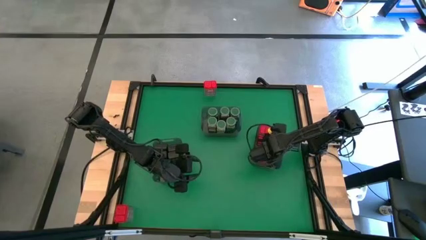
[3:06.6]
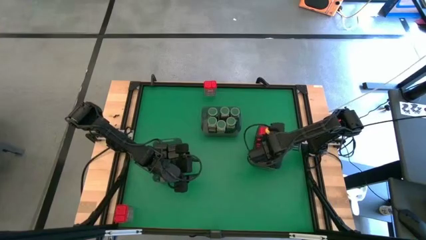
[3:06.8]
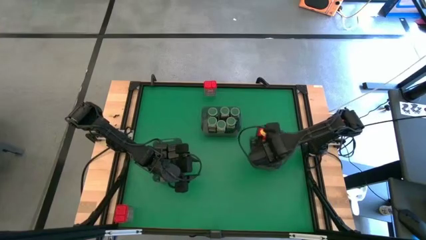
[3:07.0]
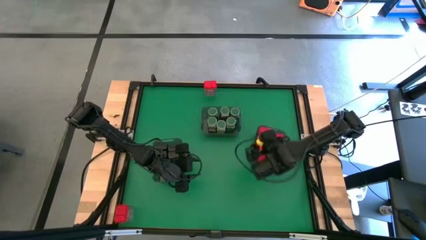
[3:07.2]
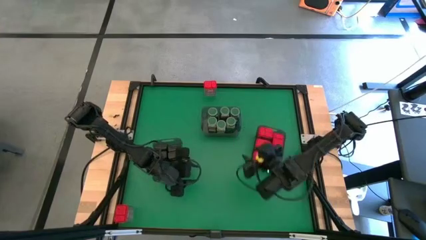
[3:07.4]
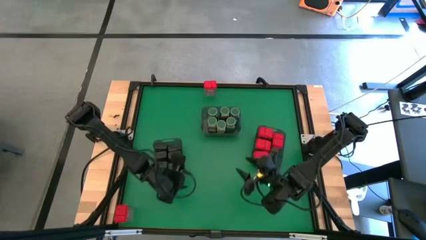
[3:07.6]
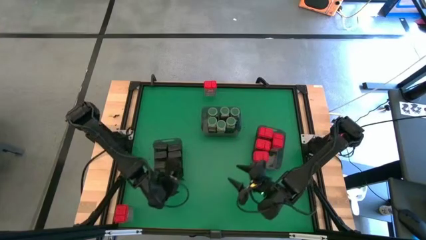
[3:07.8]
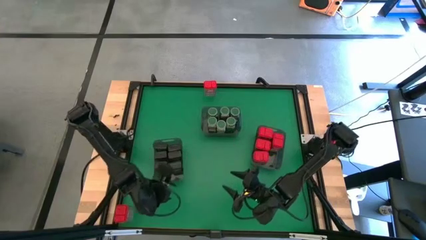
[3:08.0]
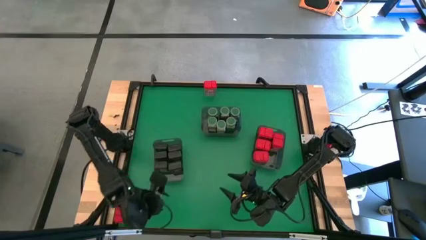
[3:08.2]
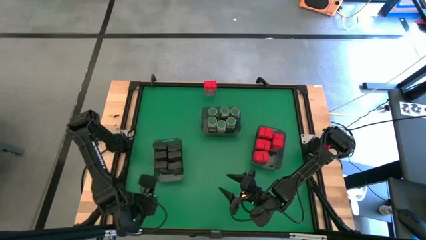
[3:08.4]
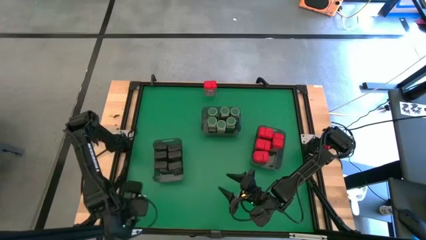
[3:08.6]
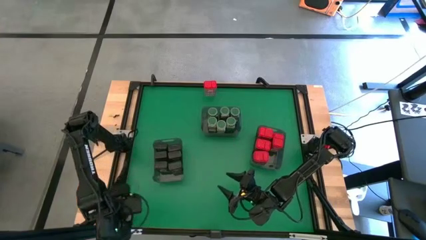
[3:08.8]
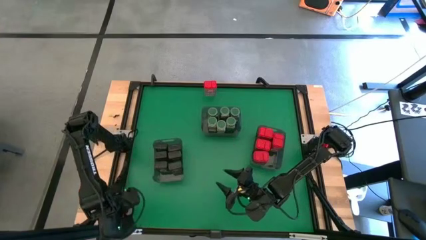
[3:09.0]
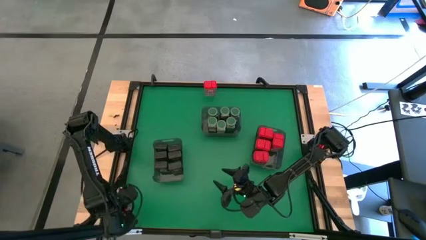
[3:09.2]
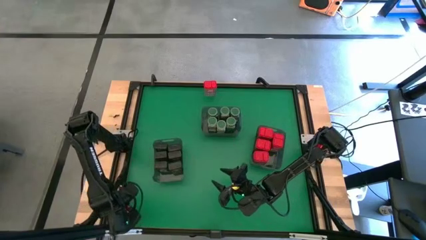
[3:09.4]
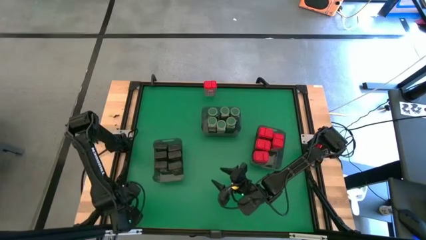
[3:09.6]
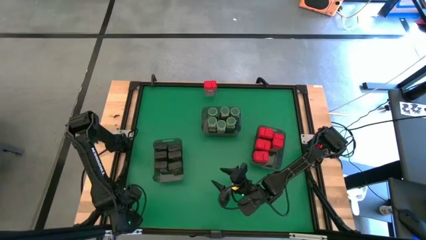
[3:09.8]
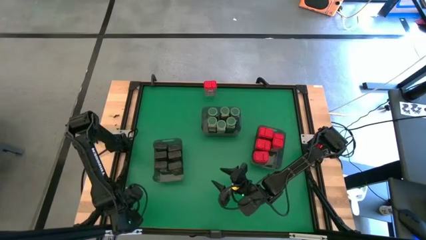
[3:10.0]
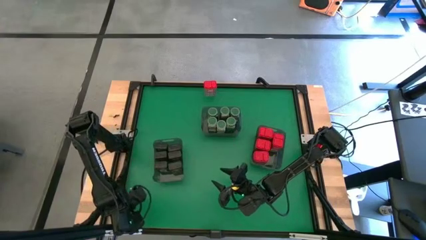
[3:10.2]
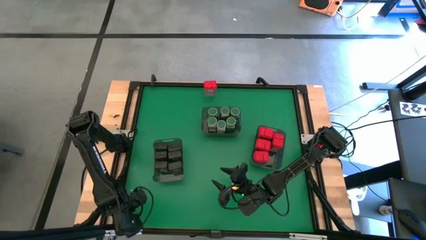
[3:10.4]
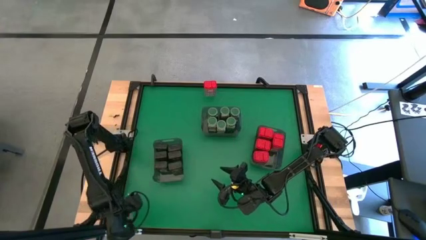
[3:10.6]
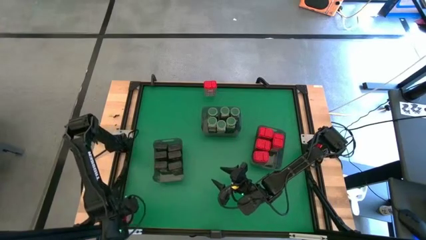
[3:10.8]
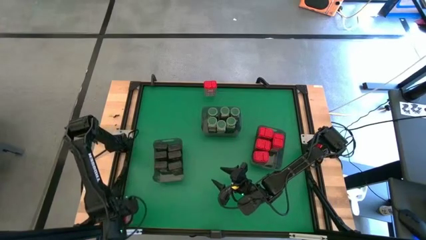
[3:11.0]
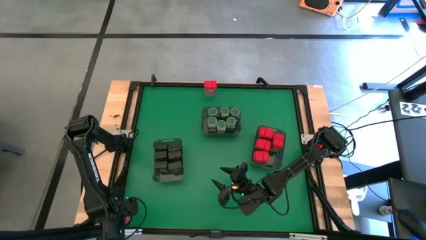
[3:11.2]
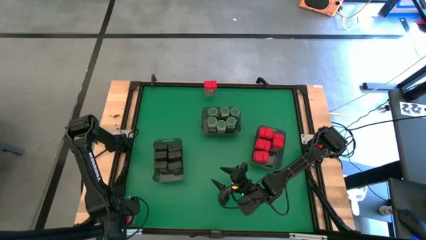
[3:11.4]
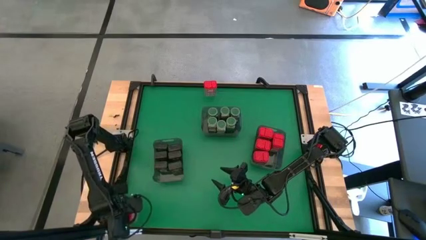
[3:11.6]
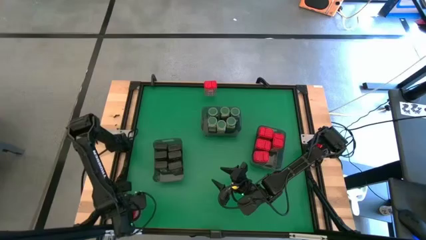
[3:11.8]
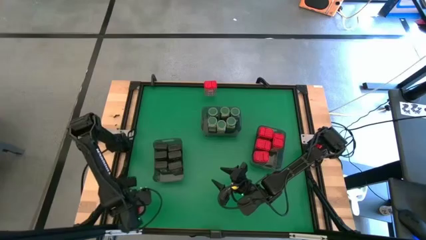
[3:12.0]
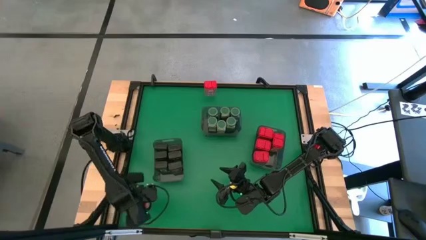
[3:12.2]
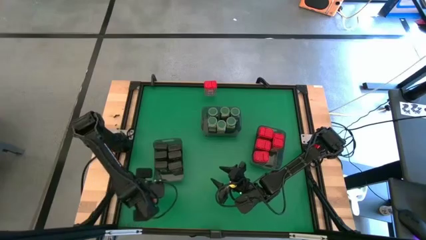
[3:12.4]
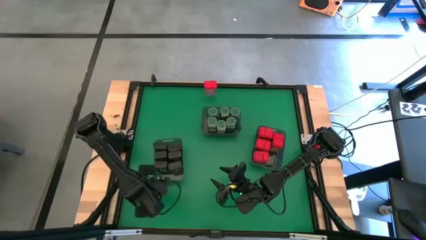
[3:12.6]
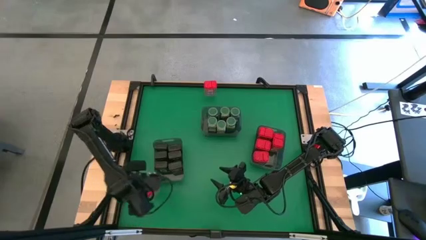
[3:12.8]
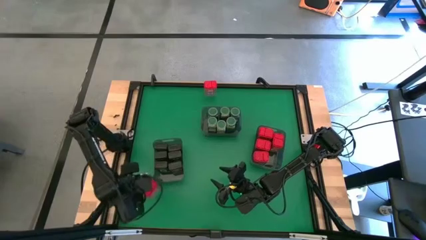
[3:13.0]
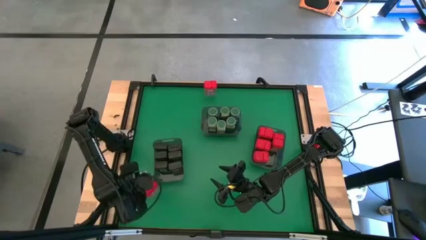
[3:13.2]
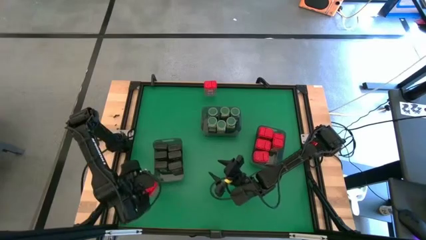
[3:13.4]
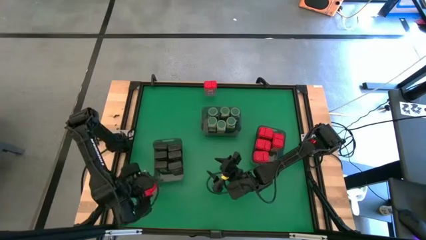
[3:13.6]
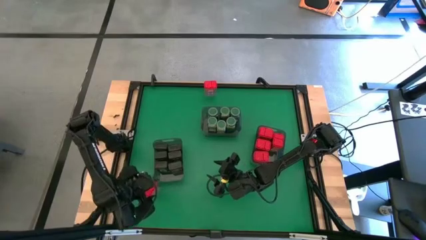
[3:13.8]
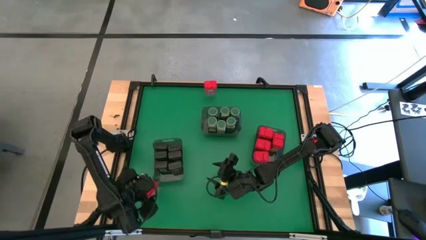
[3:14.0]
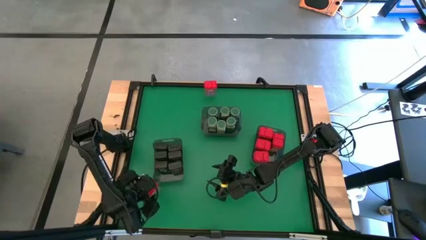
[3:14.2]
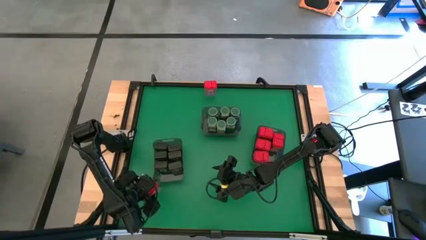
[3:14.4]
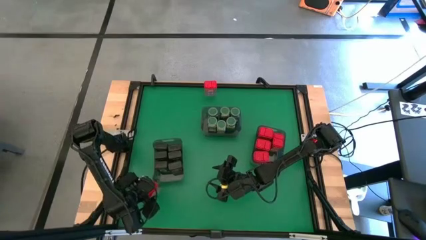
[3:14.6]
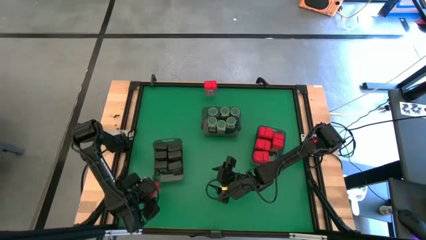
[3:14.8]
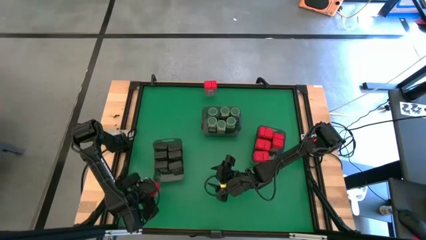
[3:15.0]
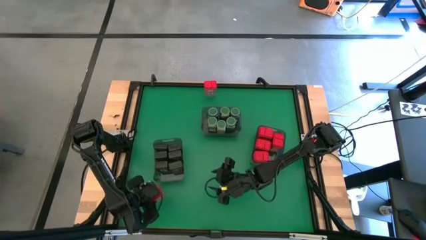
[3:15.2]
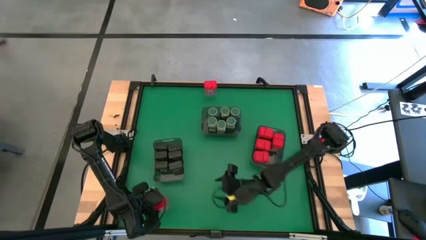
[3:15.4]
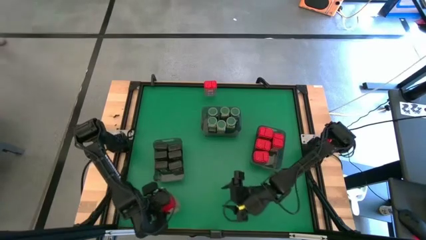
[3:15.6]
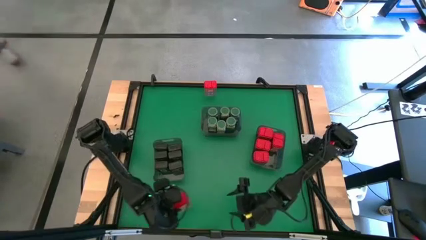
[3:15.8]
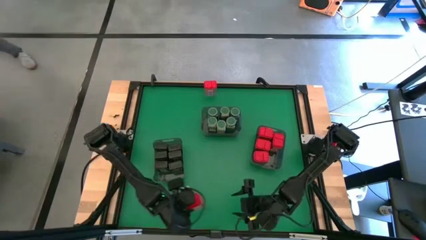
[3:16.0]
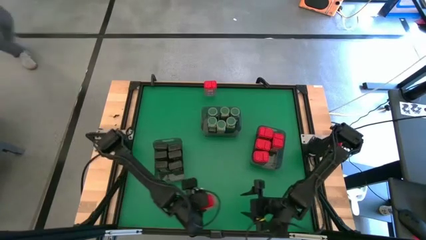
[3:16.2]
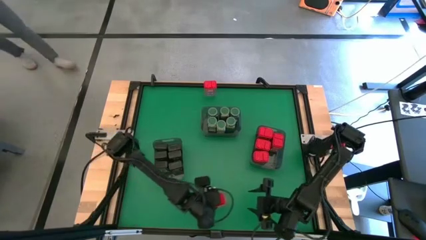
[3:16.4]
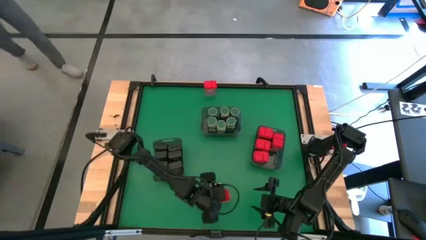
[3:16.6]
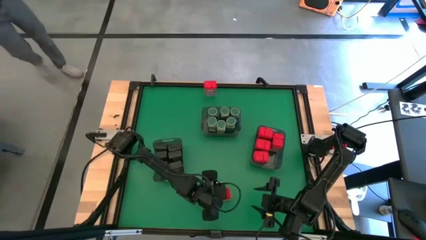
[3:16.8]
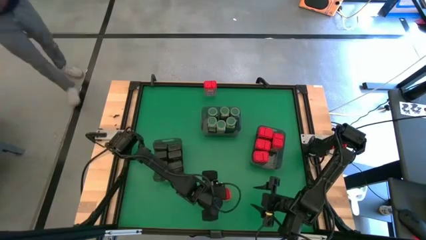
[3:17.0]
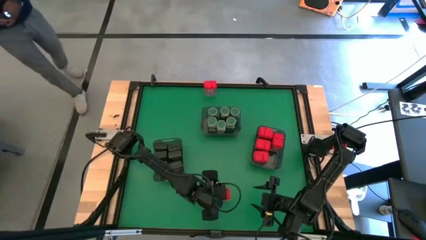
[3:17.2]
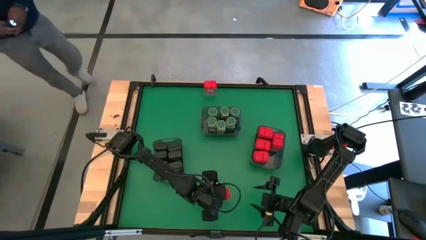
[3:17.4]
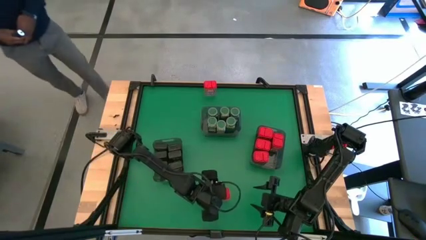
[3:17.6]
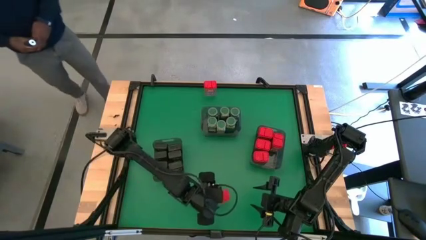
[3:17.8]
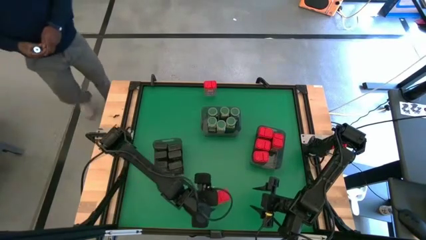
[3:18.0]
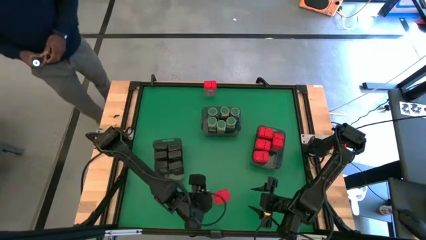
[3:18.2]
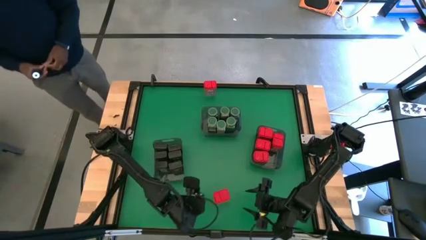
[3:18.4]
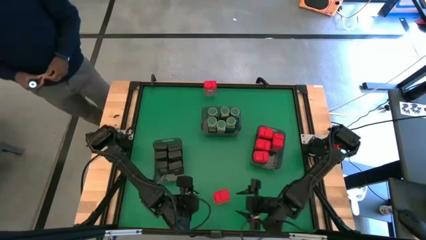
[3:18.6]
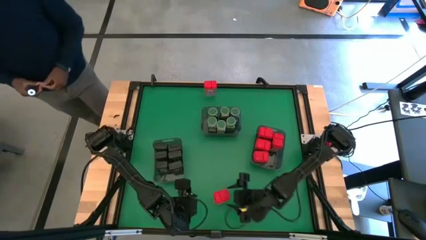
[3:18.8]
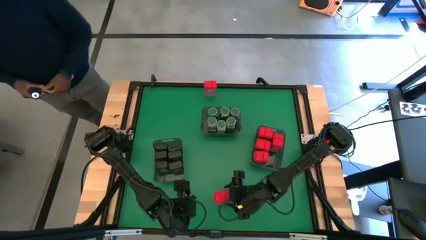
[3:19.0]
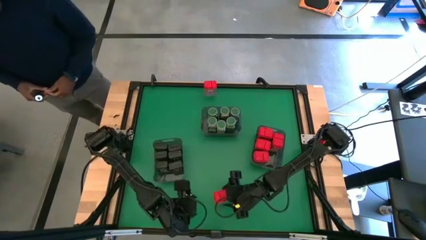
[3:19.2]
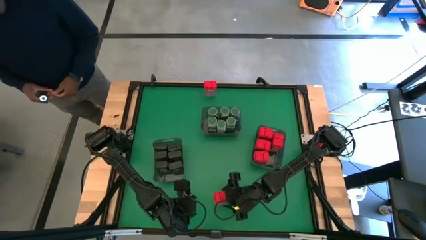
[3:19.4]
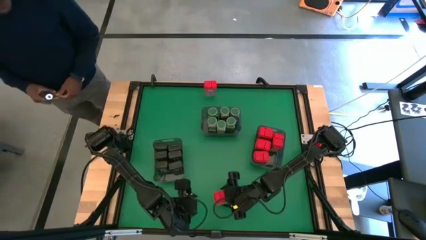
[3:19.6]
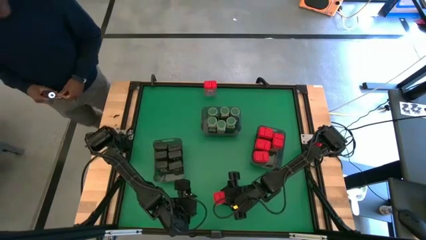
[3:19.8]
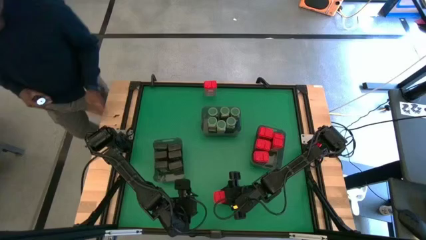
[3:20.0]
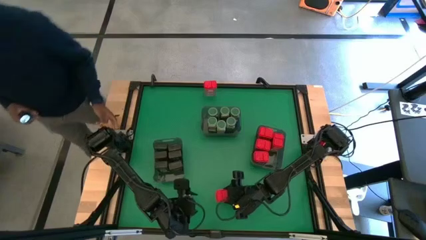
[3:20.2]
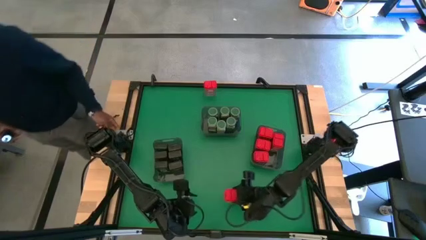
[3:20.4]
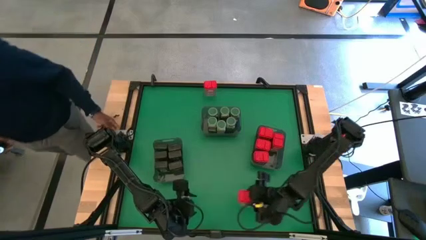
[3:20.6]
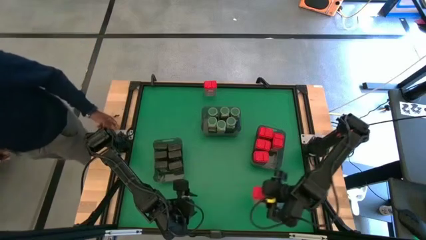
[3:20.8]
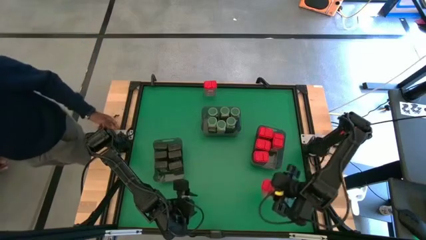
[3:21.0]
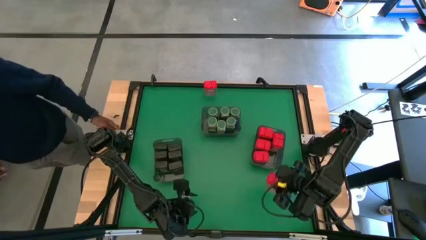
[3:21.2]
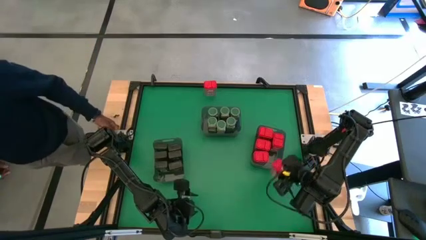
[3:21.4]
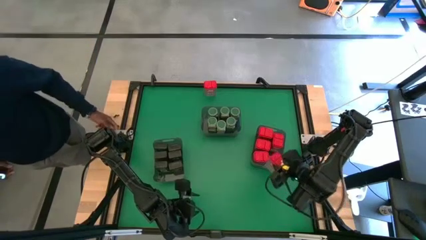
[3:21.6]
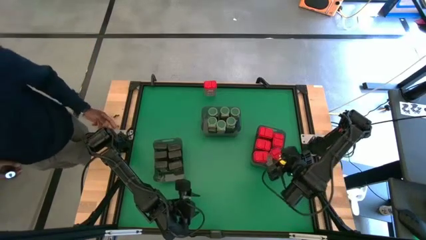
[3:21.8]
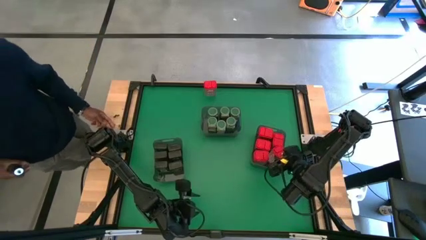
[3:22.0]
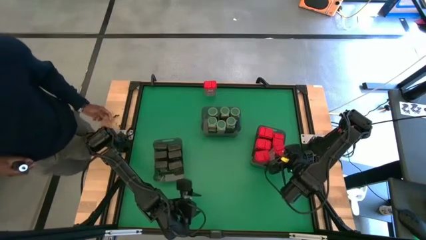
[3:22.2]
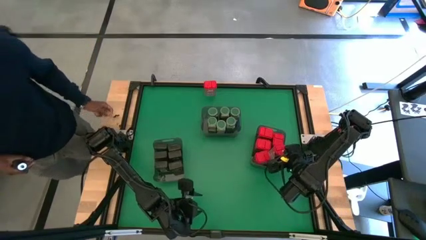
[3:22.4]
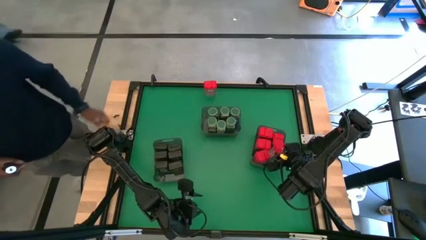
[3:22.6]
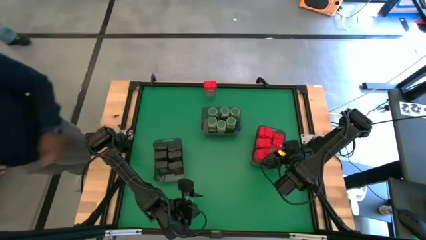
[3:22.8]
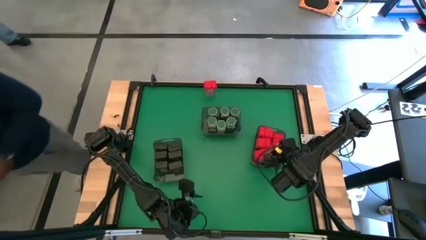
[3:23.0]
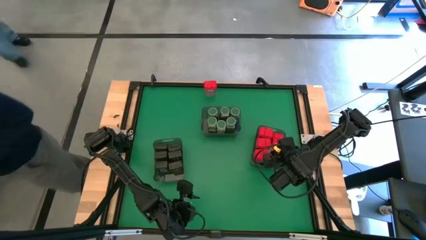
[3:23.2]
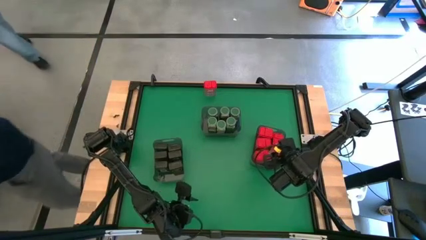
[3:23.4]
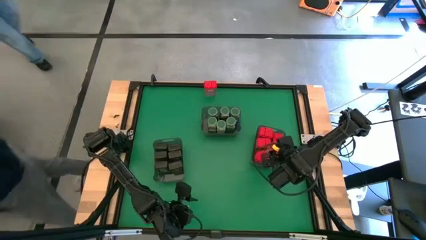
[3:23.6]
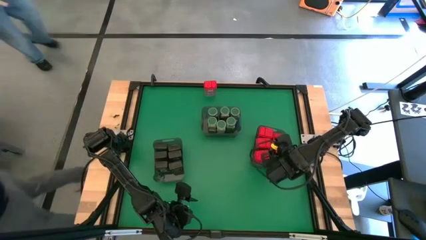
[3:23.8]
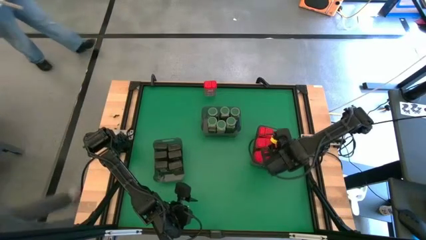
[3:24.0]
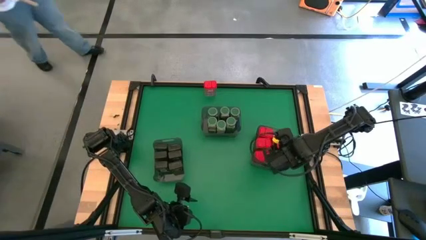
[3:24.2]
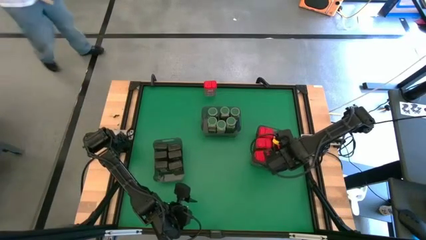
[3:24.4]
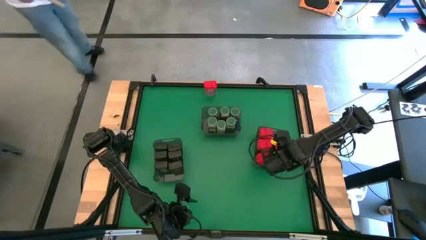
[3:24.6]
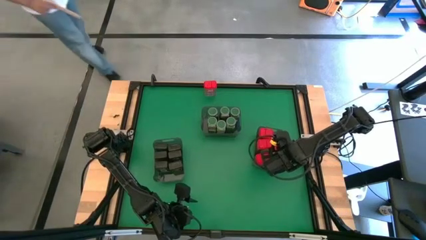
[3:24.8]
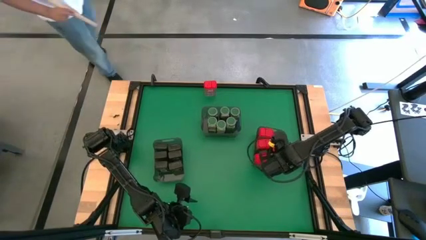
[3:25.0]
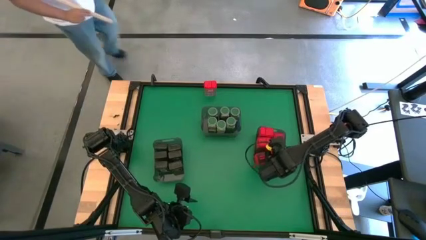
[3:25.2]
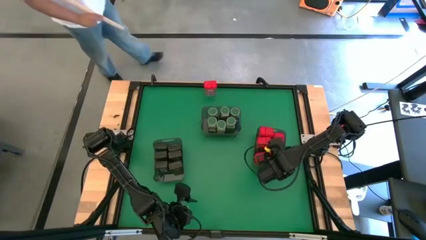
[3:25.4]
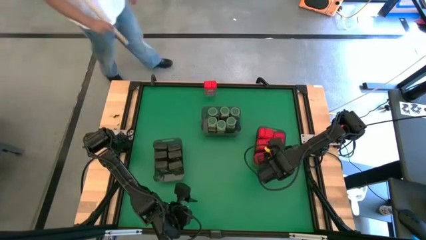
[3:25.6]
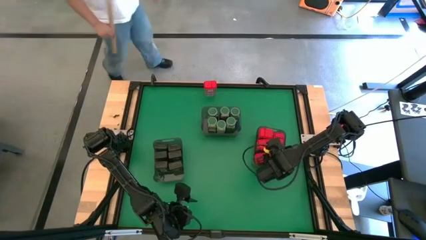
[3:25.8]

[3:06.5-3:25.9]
Task: Sort spices by type
Put the red seasoning can into the right black bin
